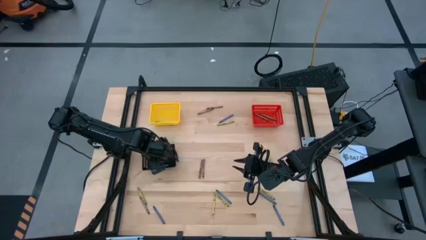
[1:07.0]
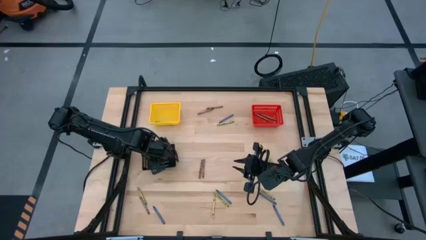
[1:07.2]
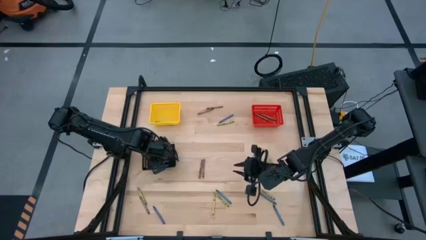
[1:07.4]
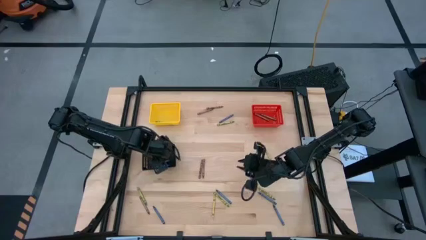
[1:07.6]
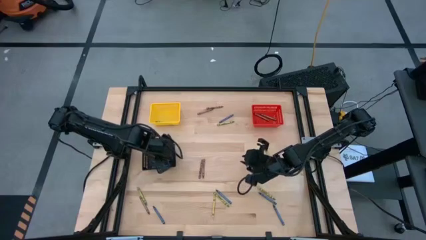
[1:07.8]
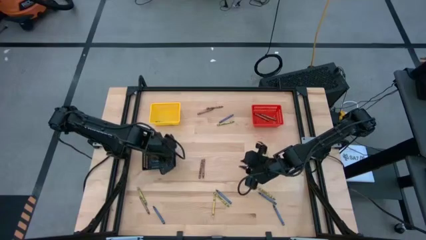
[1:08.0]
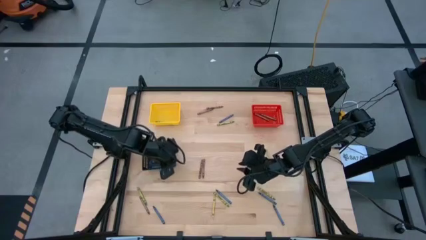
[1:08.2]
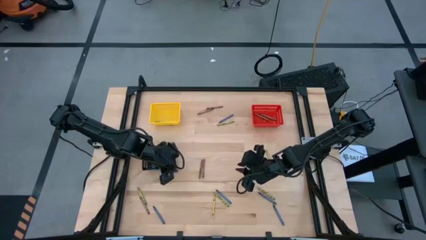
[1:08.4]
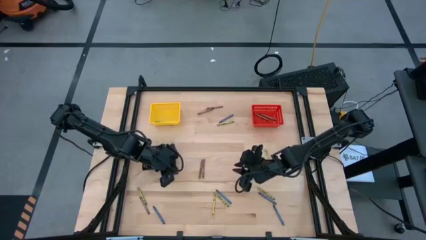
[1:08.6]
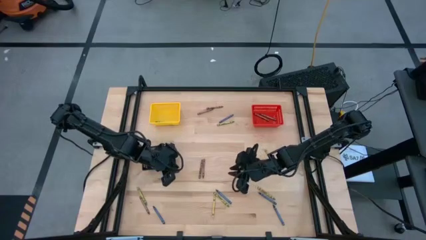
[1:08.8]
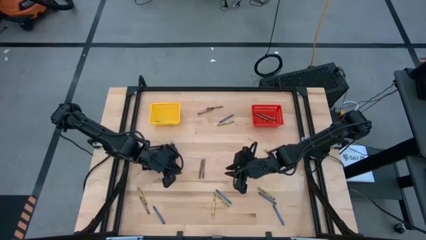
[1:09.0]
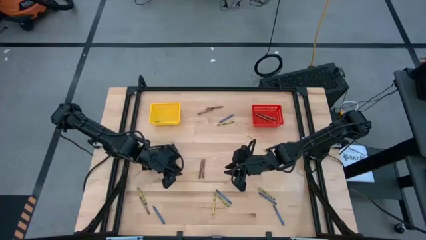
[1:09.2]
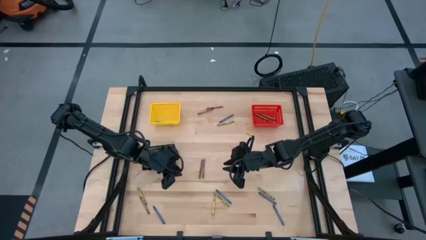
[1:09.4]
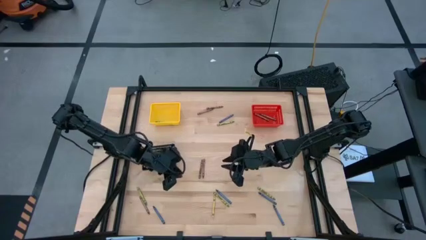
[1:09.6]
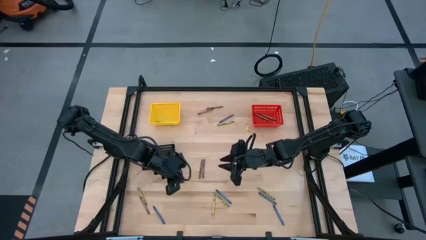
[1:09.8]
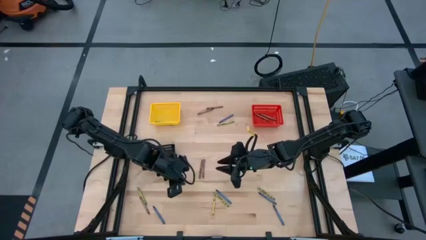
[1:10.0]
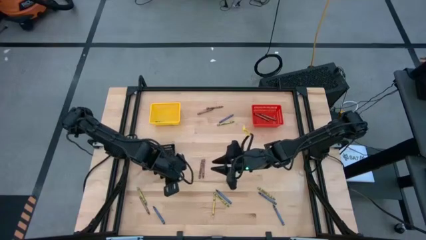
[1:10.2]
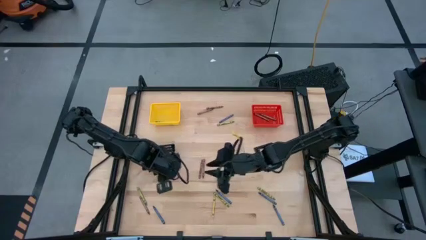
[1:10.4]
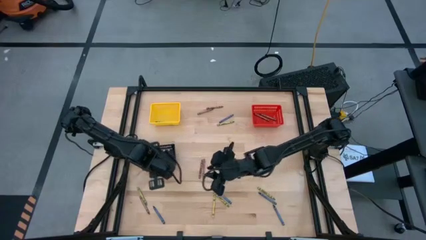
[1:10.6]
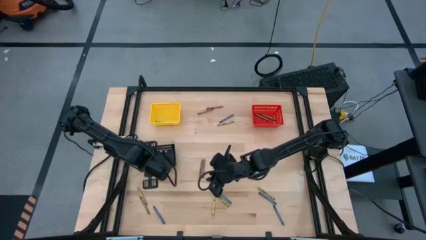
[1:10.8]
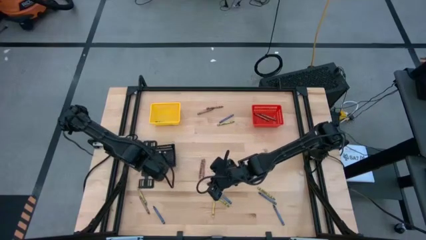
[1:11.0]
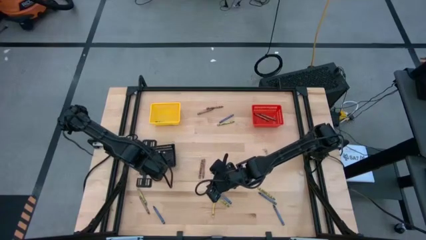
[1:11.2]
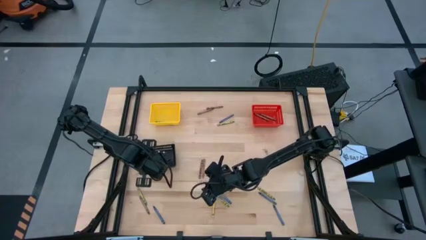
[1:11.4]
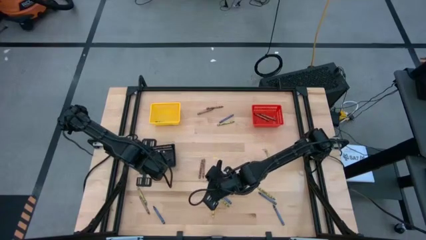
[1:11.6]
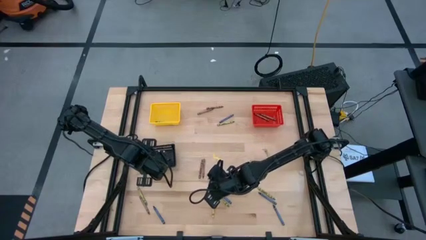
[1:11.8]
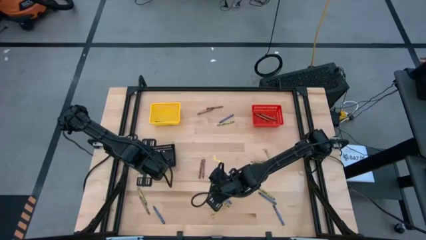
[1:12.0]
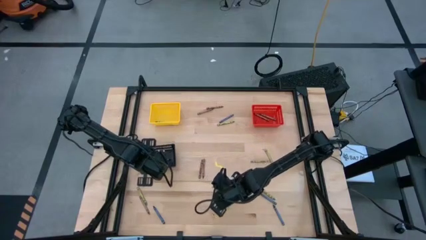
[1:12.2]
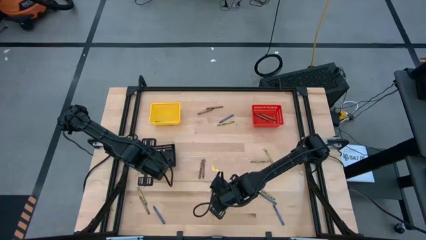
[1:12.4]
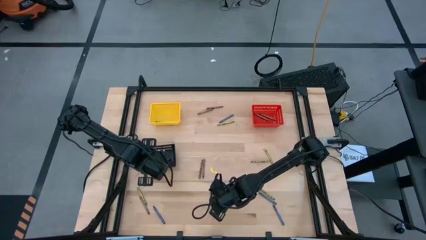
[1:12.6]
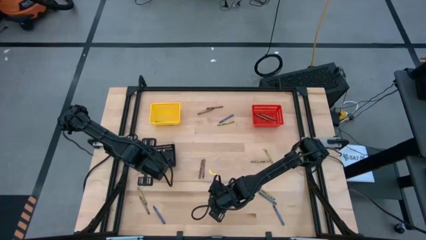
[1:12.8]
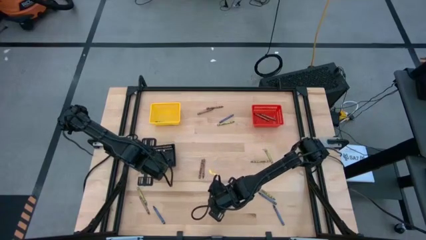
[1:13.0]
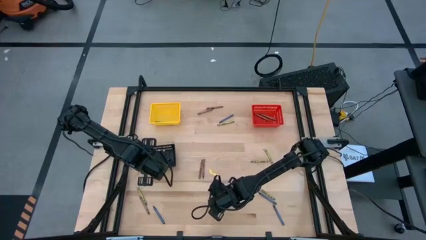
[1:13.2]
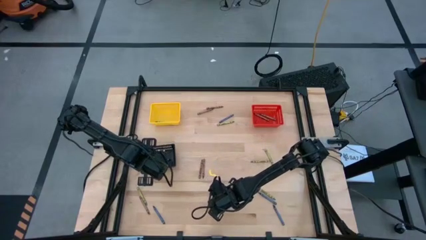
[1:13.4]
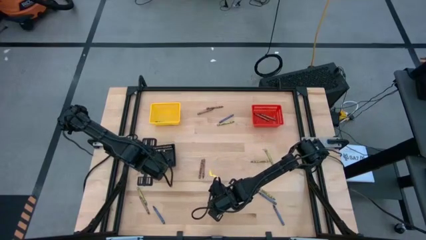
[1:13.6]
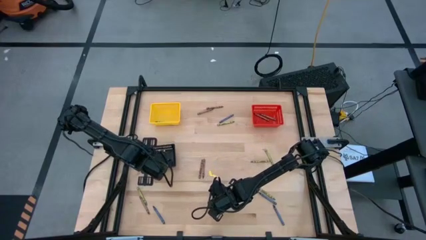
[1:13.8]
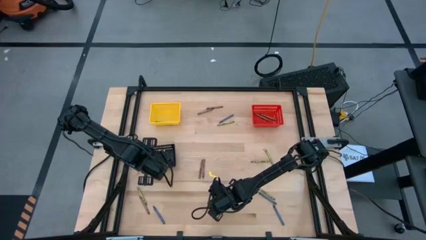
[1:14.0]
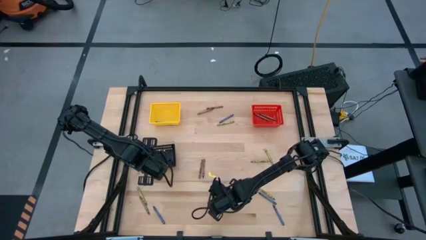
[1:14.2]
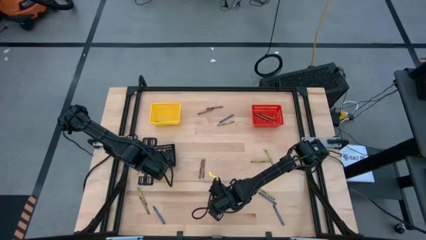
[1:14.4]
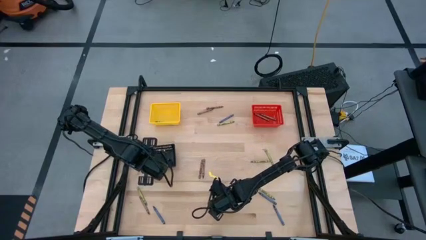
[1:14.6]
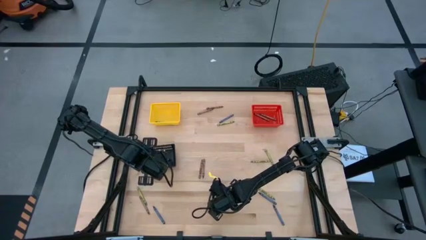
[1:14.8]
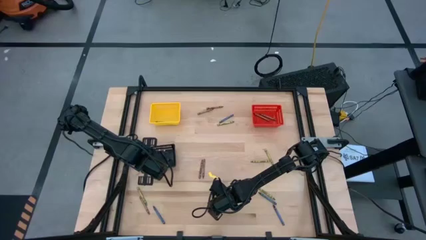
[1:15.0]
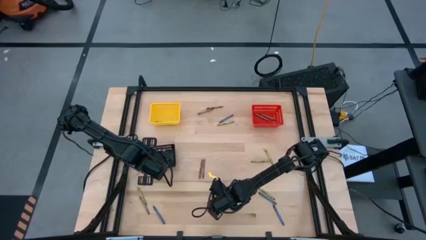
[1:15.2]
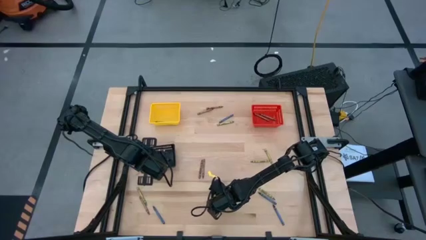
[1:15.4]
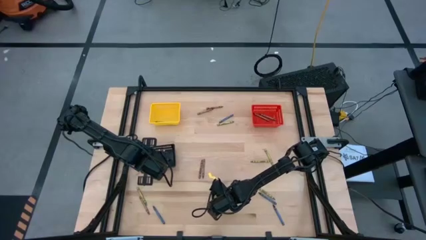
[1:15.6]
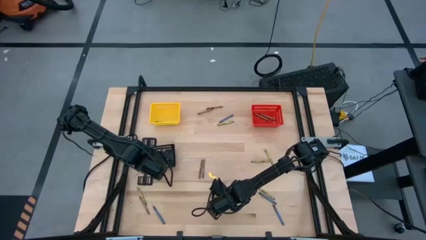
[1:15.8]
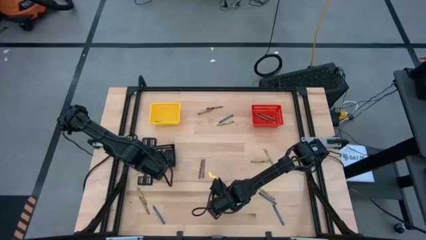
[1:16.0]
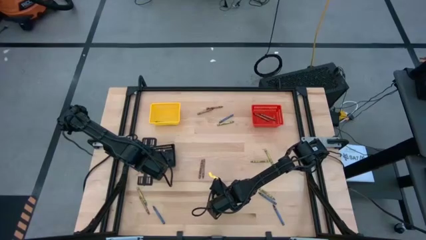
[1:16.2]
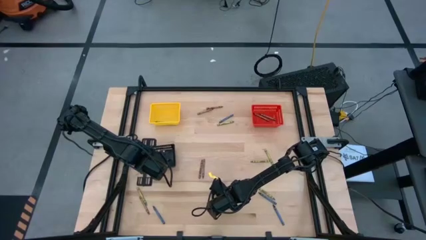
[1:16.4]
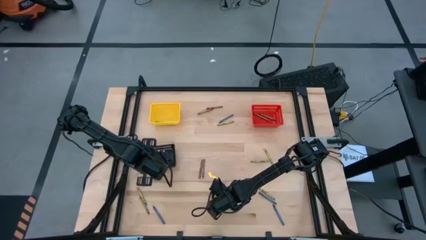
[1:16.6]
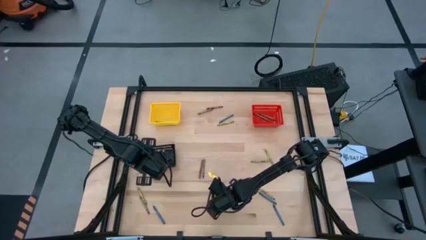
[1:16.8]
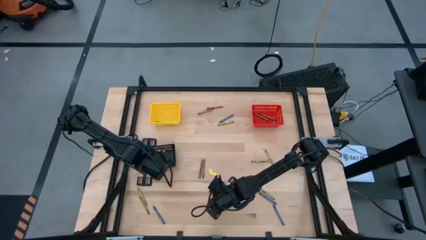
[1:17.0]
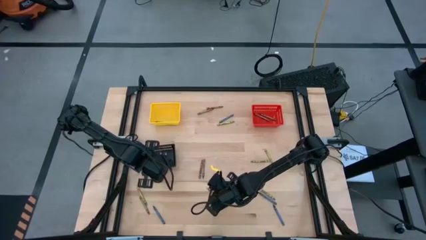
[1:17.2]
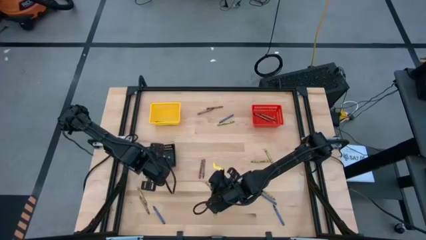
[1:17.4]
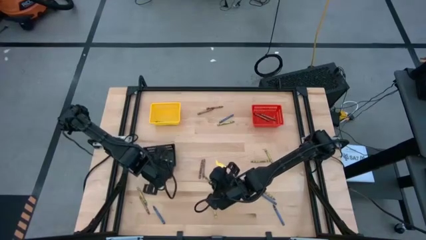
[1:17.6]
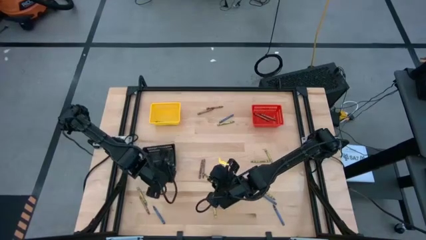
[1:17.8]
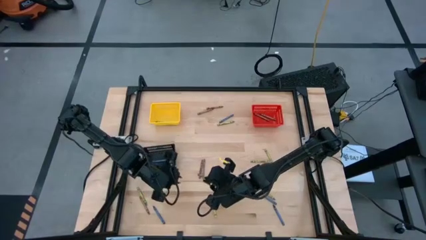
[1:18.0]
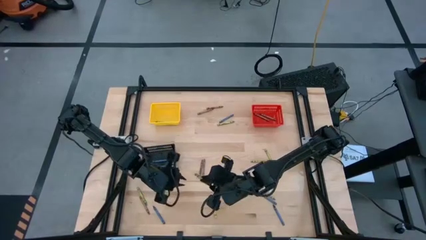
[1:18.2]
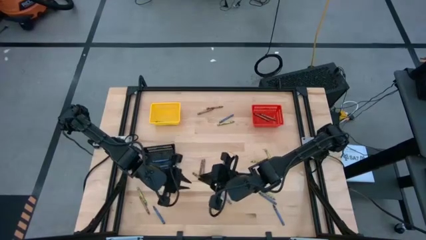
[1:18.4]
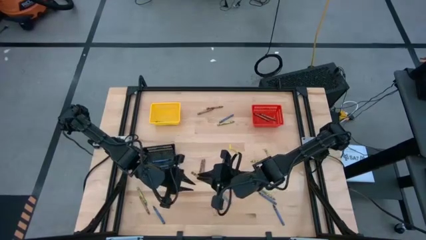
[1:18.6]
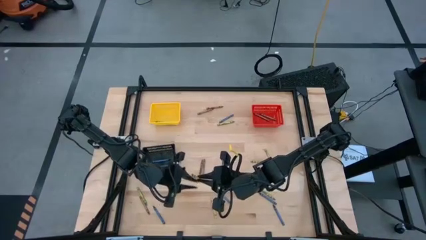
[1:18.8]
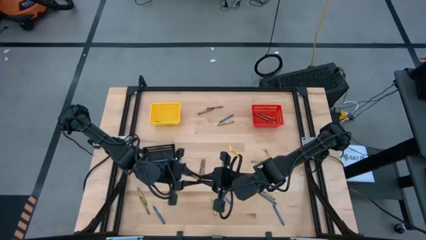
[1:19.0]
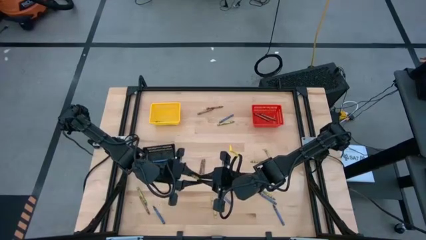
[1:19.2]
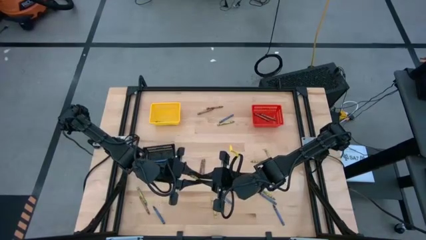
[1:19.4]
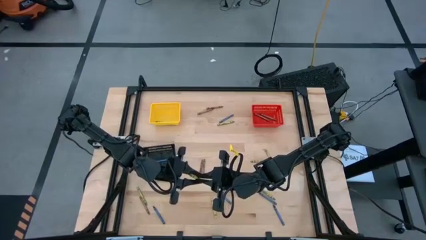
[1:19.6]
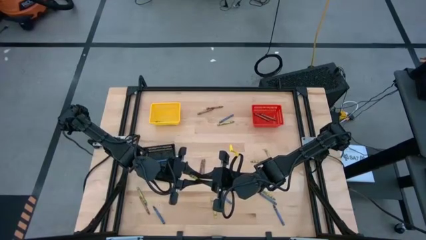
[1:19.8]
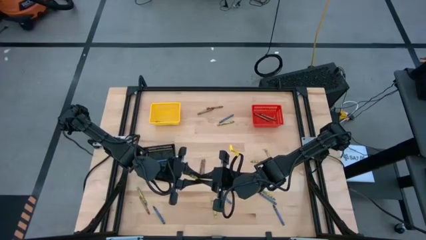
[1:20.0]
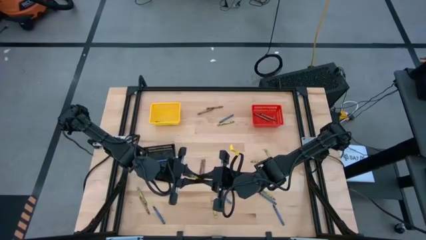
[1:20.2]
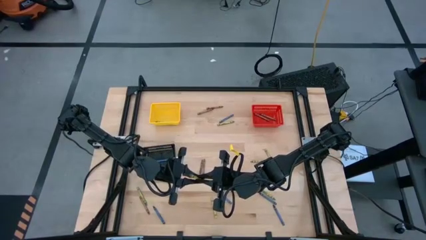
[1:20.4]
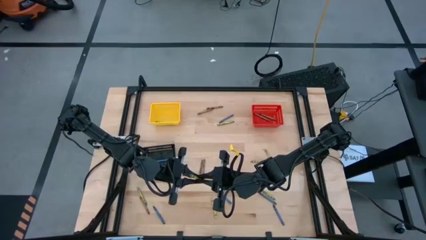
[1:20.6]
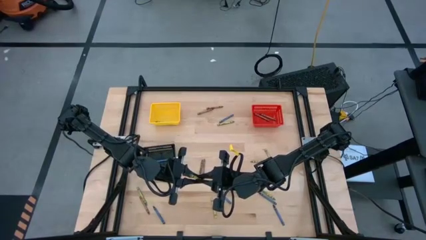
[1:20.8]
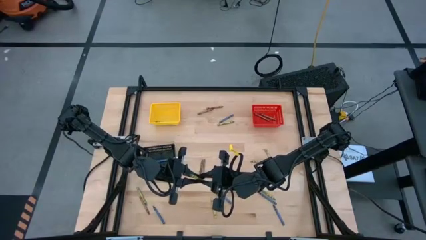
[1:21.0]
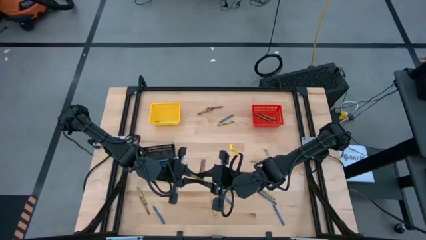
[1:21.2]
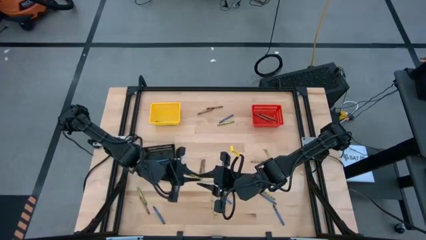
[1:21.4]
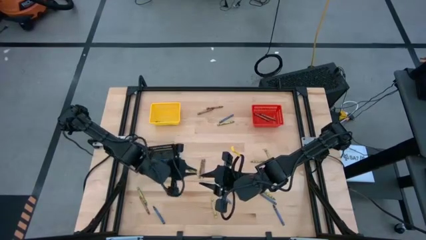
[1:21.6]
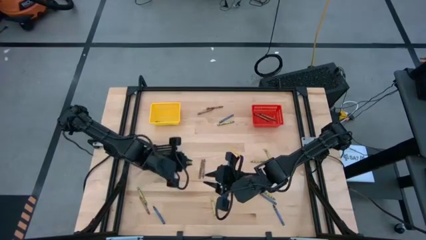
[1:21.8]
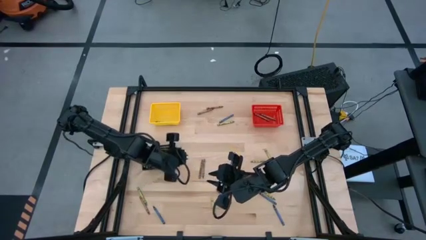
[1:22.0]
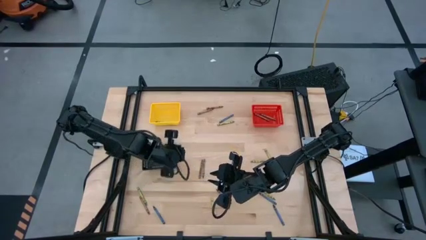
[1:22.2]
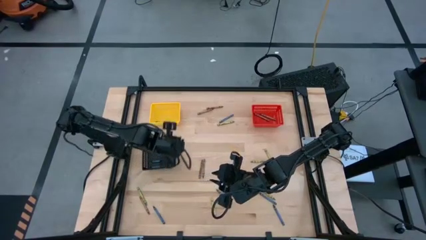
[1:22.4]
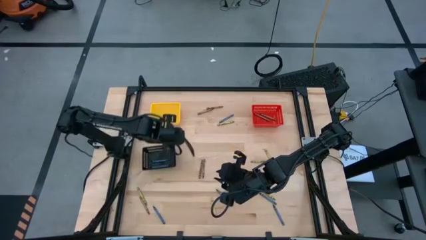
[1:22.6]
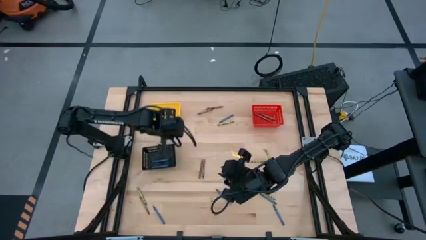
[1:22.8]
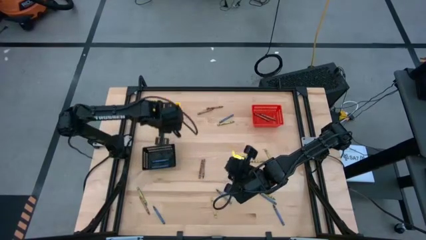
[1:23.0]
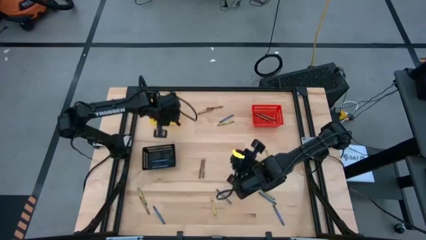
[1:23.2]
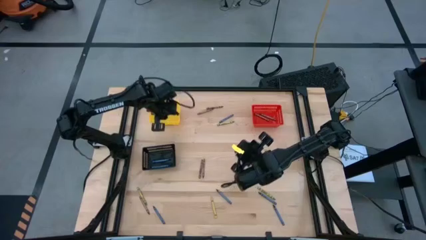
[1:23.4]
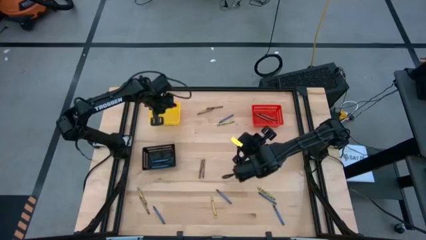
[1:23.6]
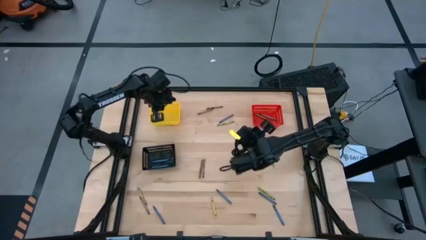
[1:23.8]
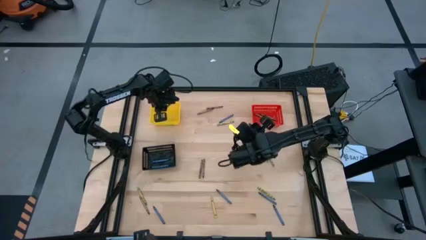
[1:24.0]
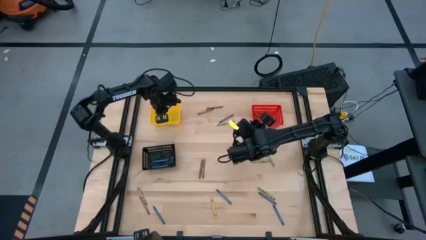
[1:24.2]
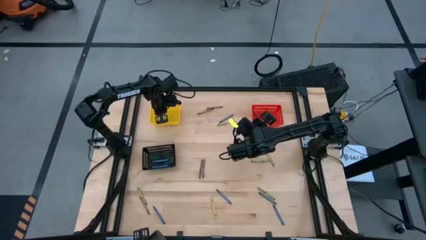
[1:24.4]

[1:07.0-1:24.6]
Task: Sort crayons
Put the green crayon into the yellow bin
